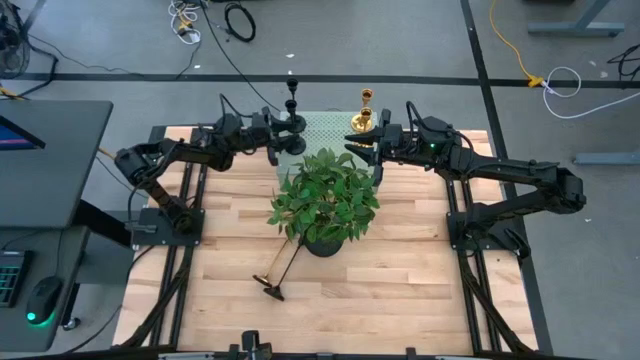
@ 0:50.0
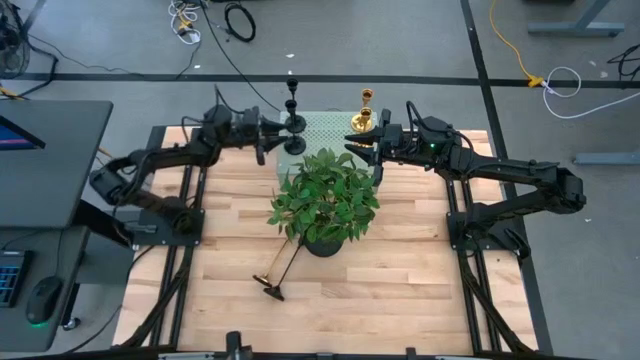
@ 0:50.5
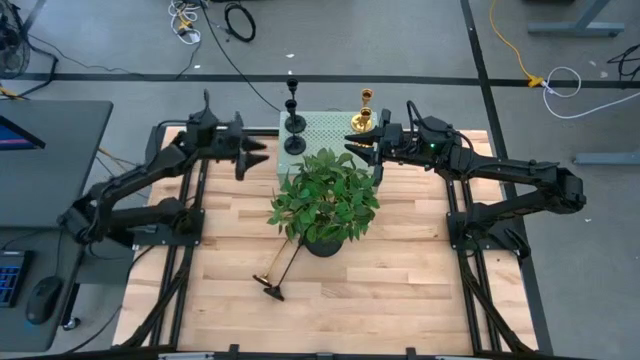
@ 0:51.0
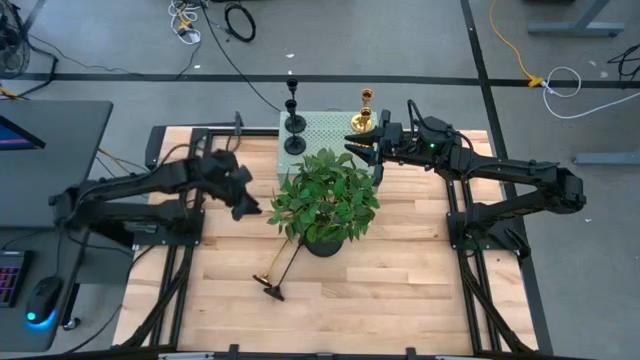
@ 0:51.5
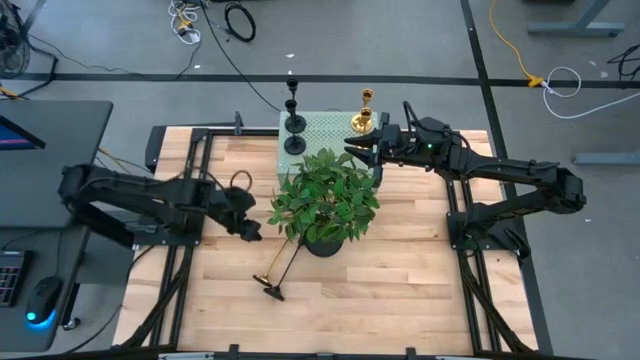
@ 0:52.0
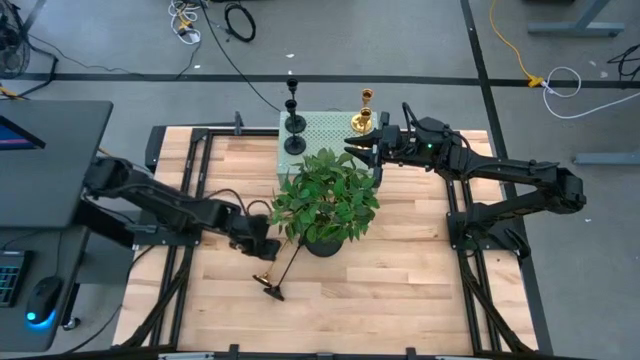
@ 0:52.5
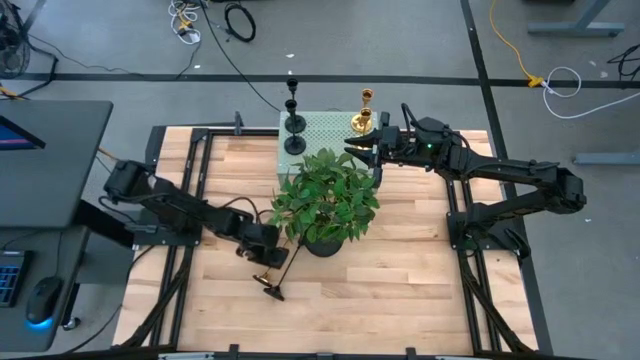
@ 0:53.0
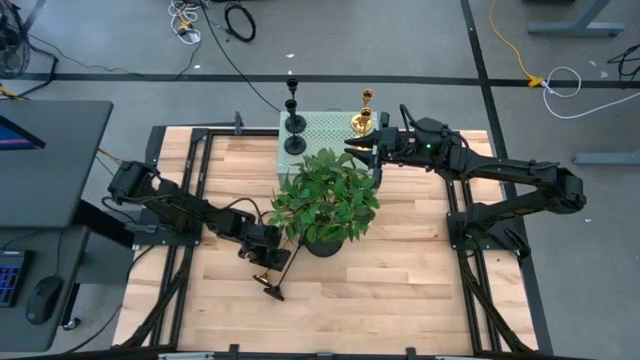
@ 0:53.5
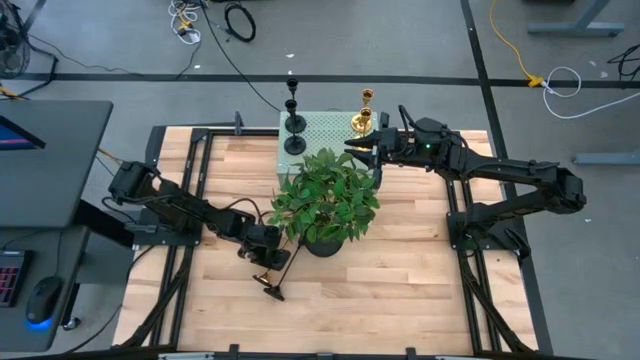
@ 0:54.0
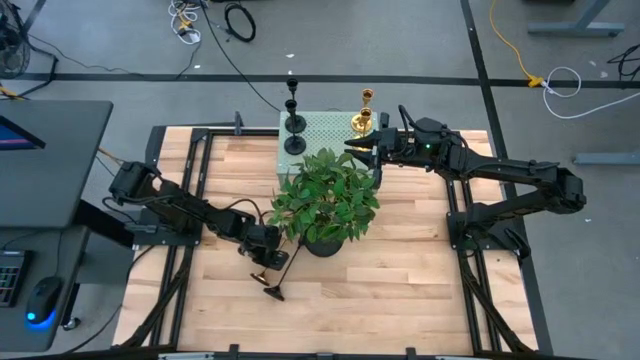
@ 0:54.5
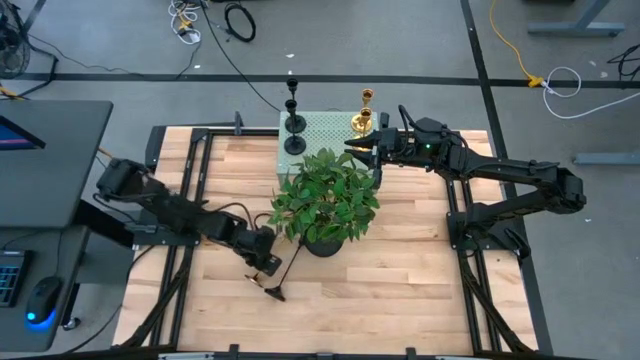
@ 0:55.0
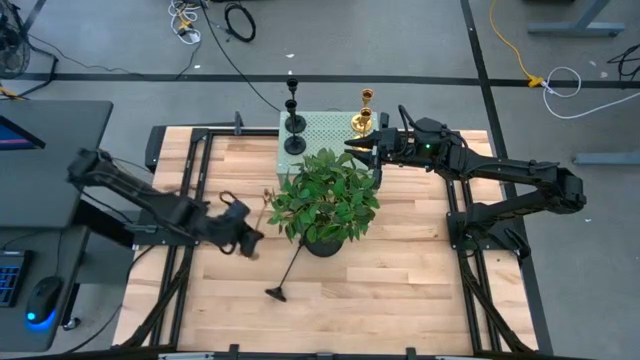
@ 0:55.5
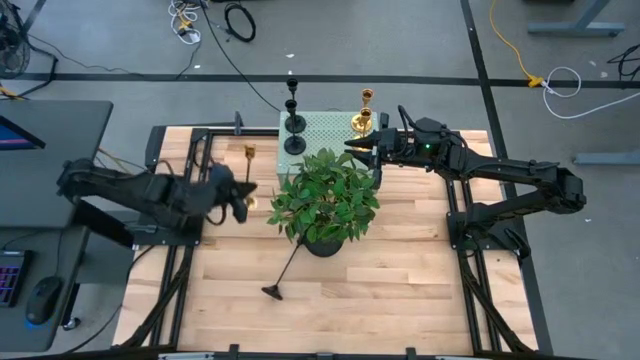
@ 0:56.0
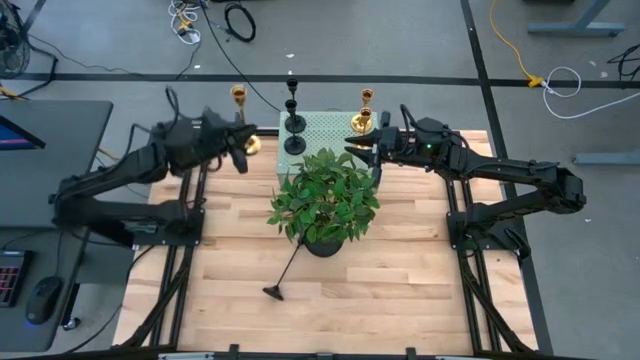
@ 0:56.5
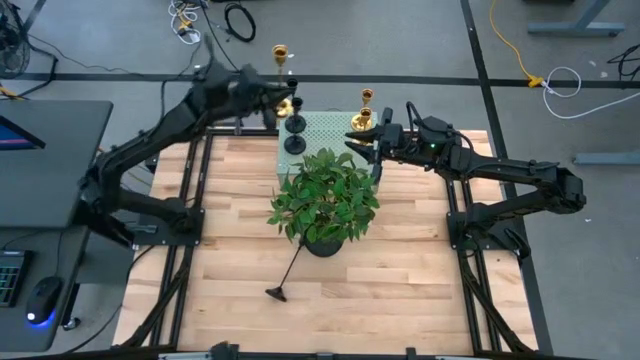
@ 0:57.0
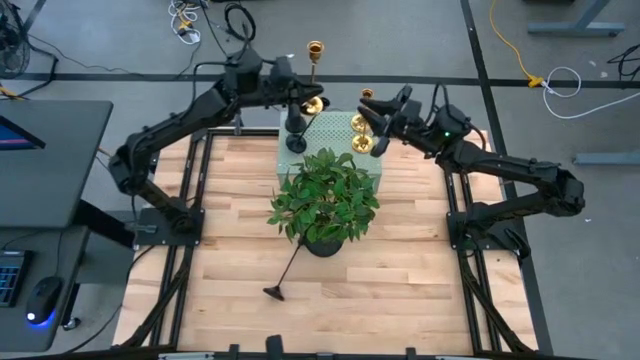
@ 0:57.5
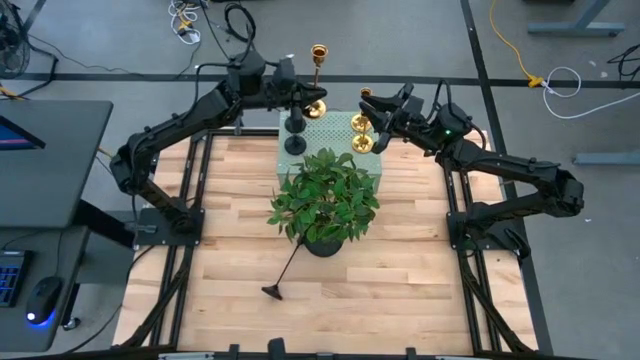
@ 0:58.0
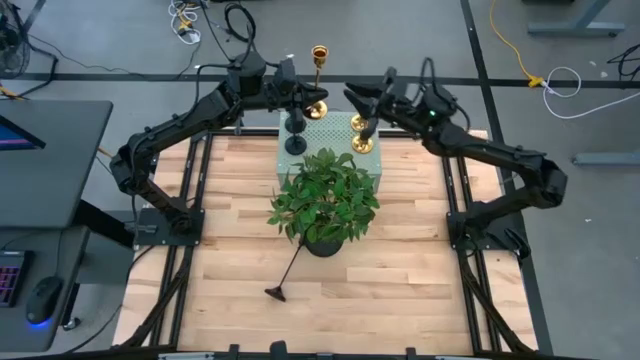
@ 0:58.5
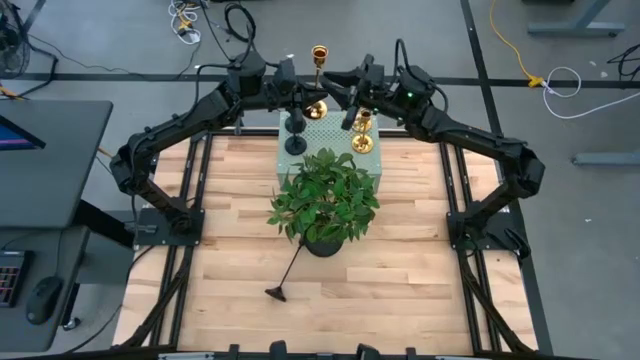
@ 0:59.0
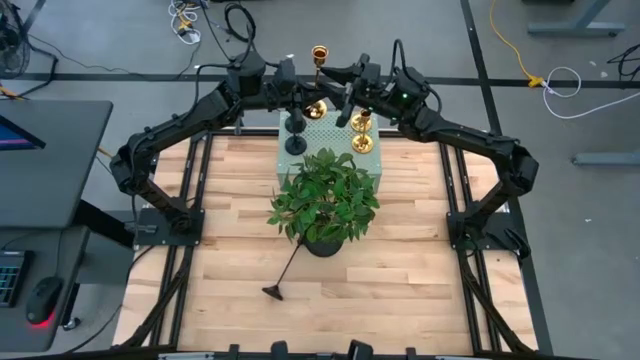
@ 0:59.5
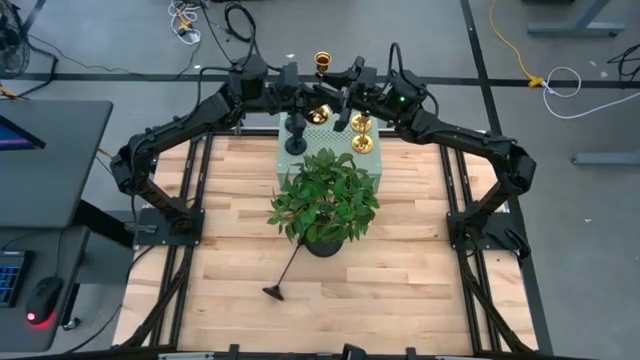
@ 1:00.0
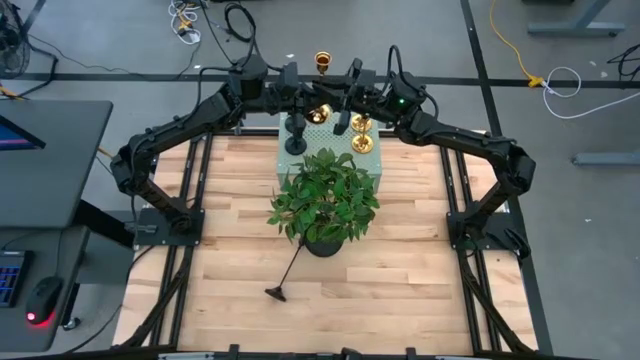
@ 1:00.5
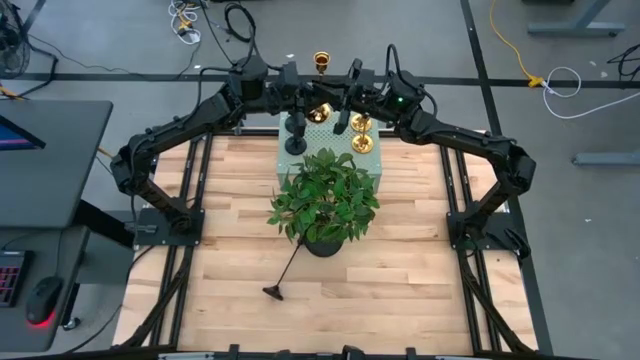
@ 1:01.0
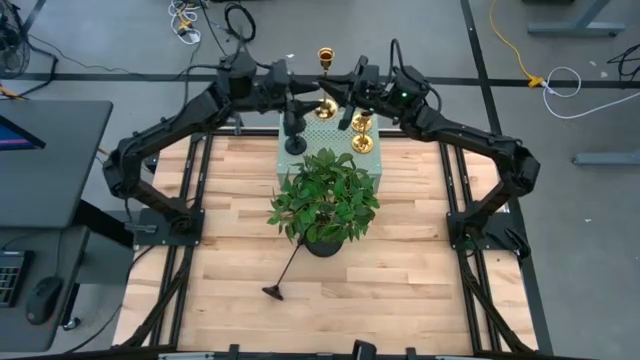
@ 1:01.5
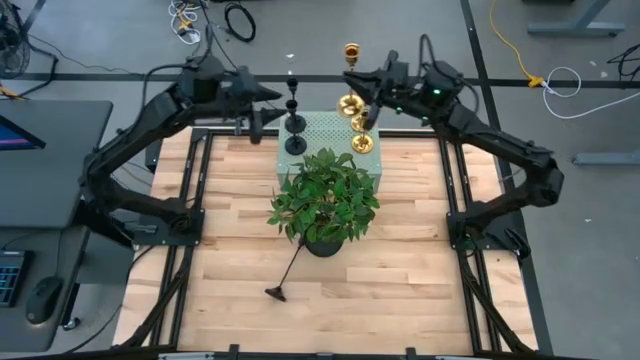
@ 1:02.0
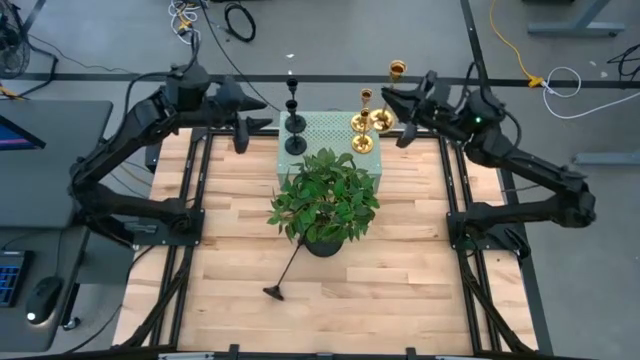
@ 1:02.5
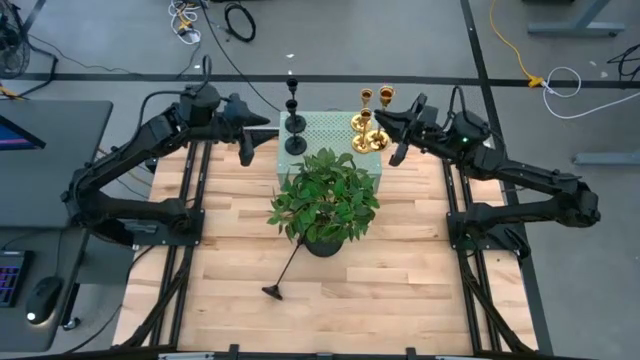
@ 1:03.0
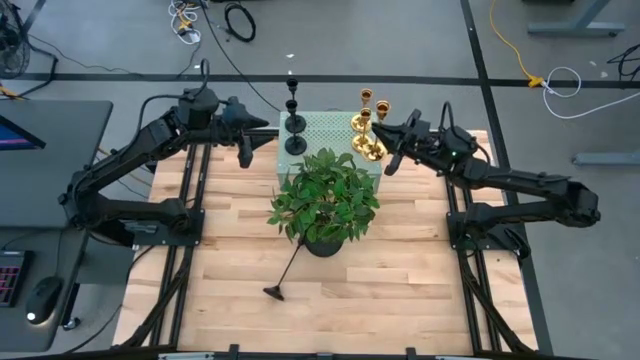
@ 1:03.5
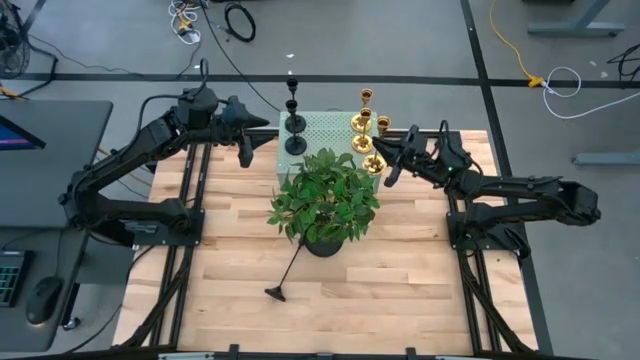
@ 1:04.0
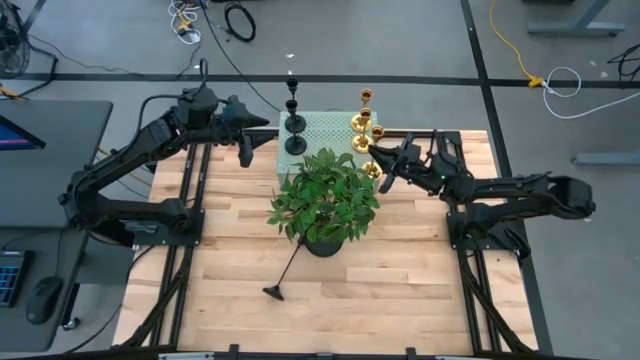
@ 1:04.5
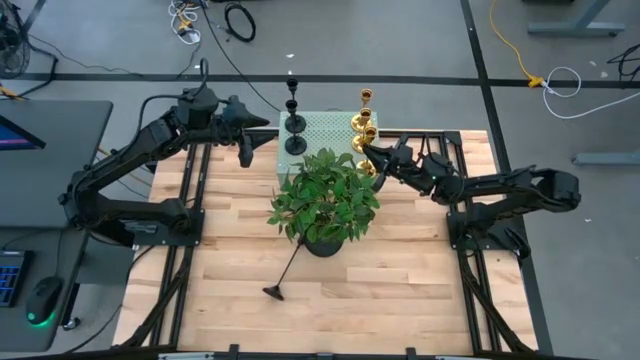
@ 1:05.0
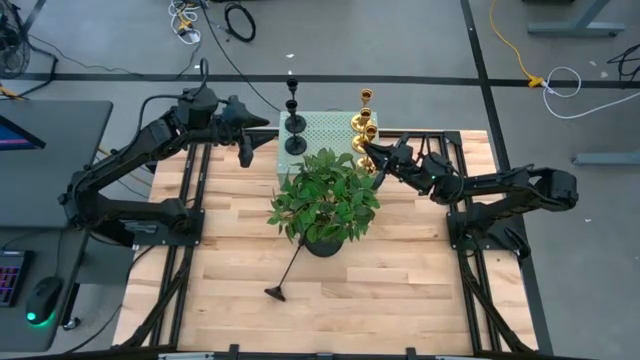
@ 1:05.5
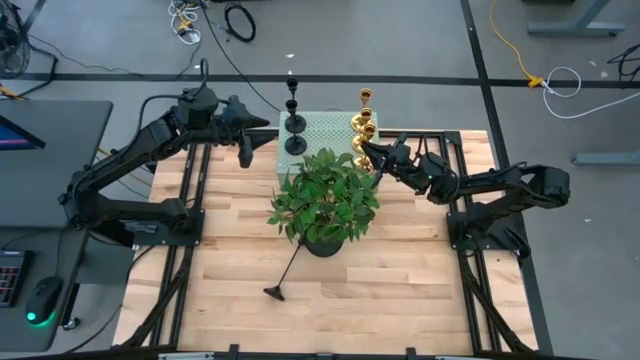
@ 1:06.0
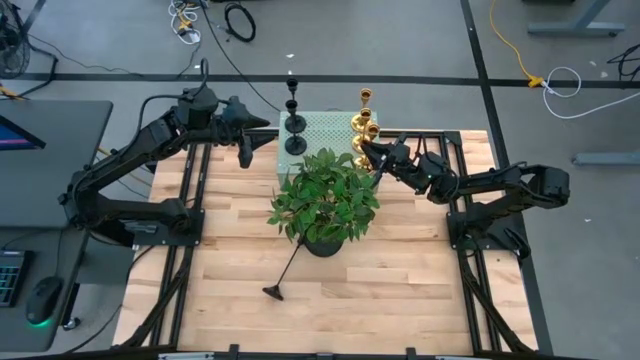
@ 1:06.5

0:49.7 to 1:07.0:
Task: Pick & Place candle stick holders
Put the gold candle holder on the shelf aligned with the other gold candle holders
